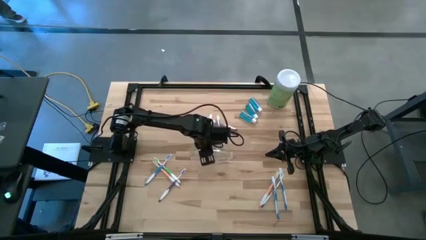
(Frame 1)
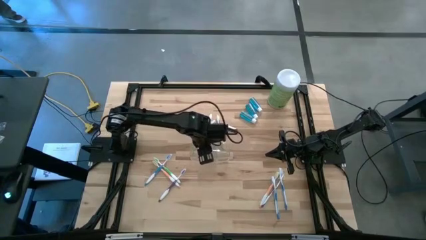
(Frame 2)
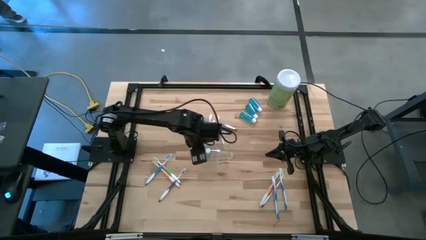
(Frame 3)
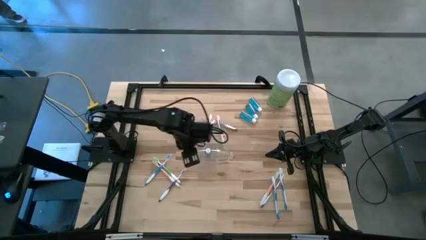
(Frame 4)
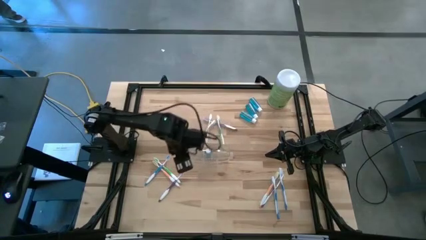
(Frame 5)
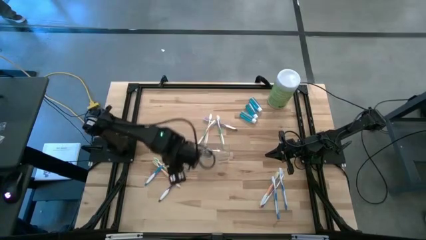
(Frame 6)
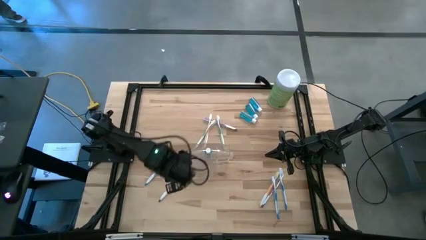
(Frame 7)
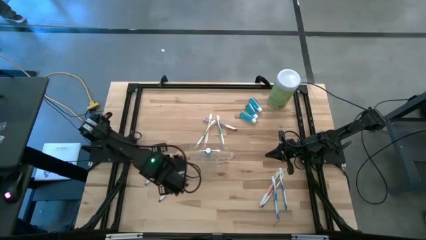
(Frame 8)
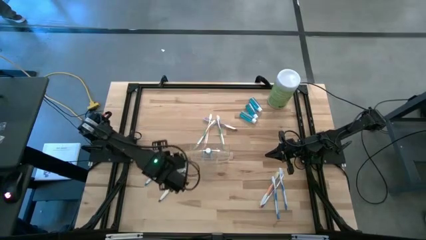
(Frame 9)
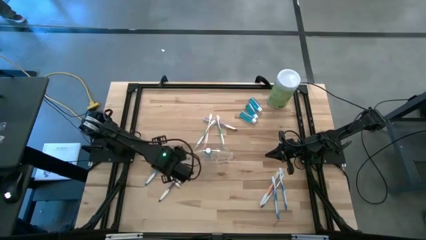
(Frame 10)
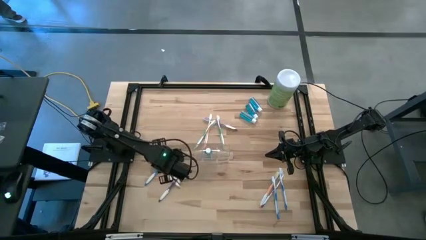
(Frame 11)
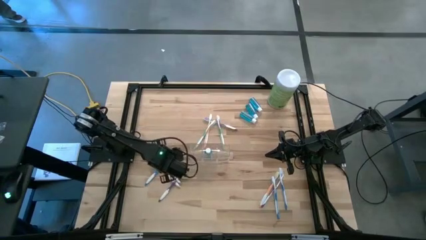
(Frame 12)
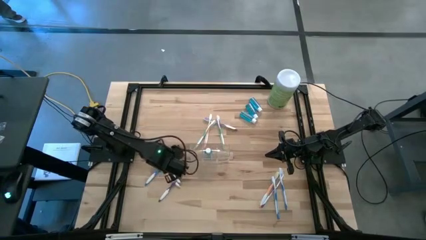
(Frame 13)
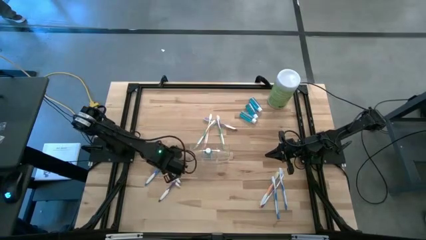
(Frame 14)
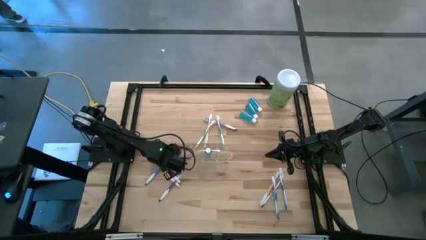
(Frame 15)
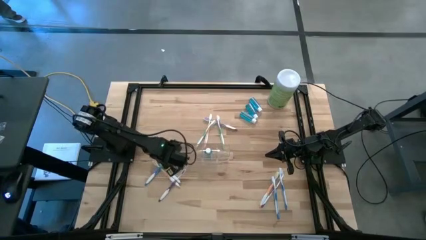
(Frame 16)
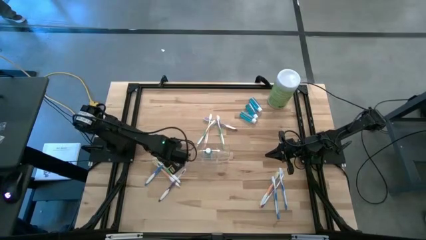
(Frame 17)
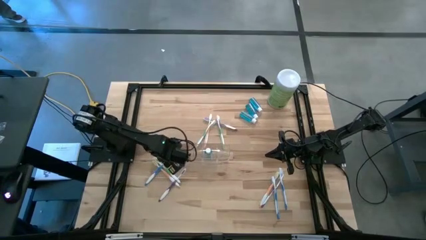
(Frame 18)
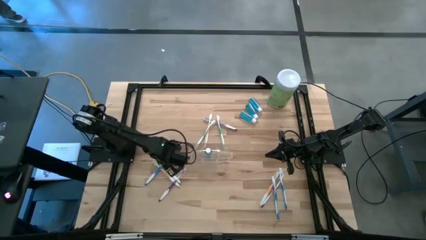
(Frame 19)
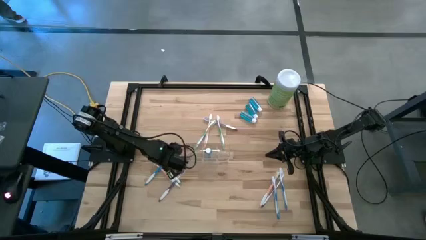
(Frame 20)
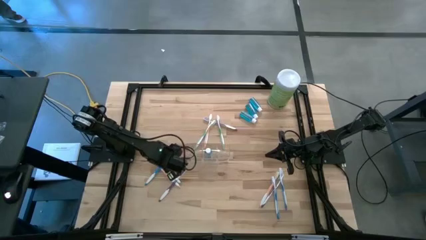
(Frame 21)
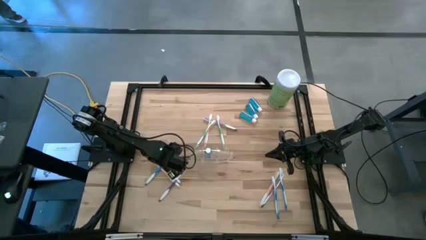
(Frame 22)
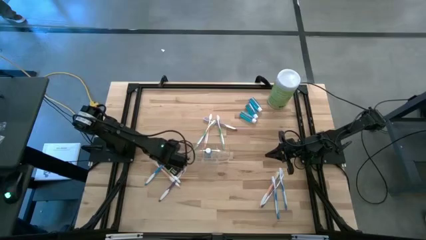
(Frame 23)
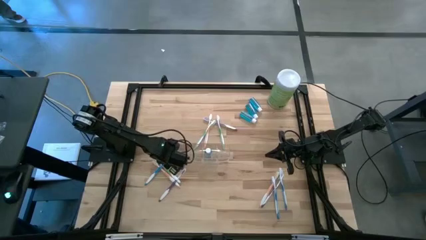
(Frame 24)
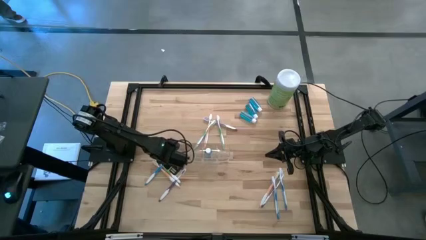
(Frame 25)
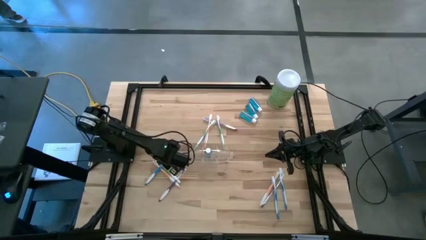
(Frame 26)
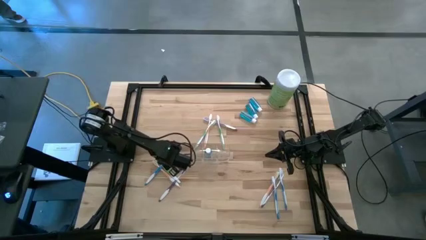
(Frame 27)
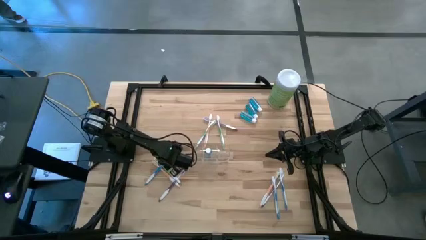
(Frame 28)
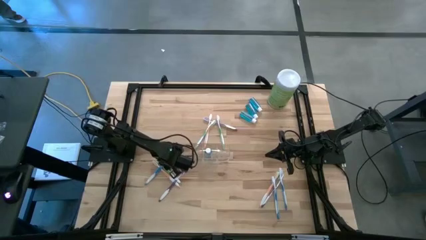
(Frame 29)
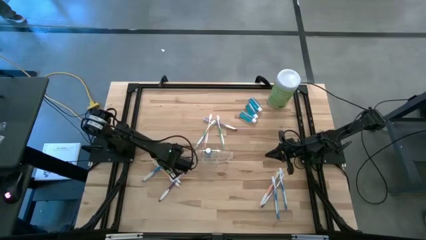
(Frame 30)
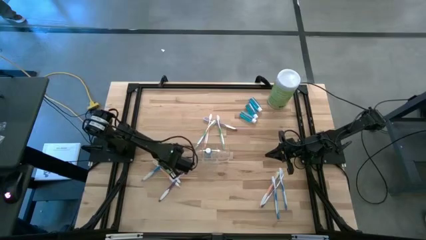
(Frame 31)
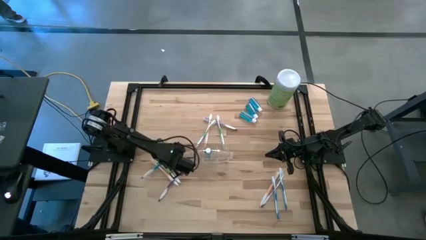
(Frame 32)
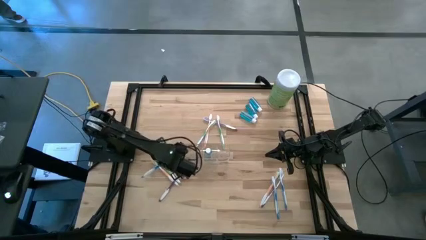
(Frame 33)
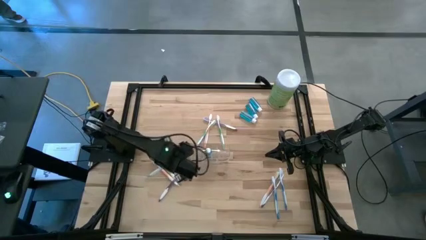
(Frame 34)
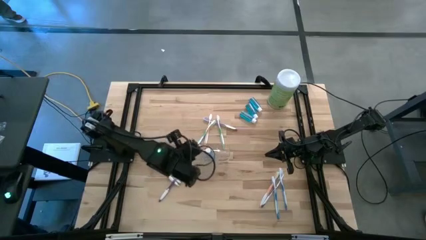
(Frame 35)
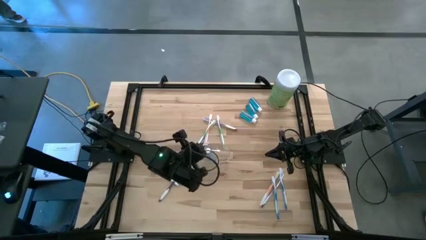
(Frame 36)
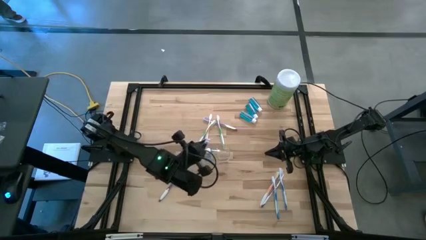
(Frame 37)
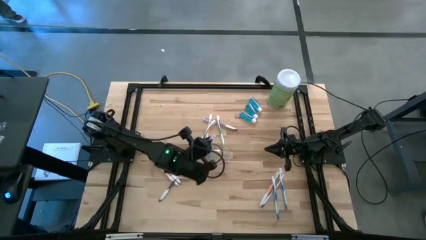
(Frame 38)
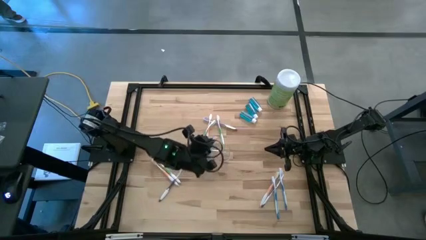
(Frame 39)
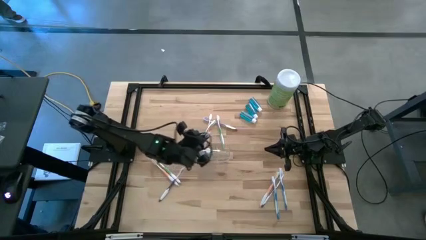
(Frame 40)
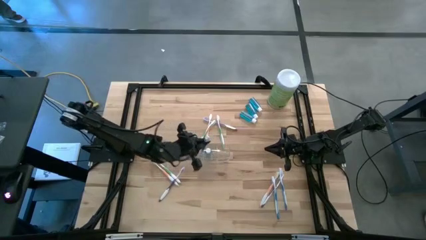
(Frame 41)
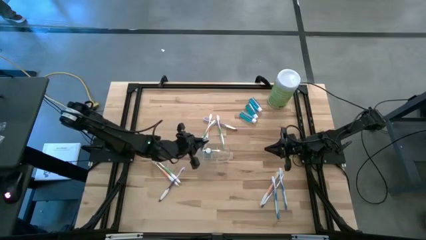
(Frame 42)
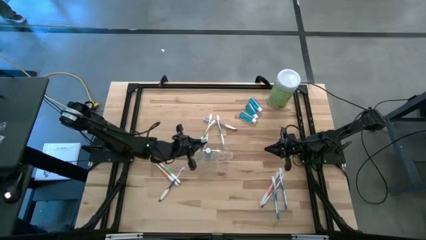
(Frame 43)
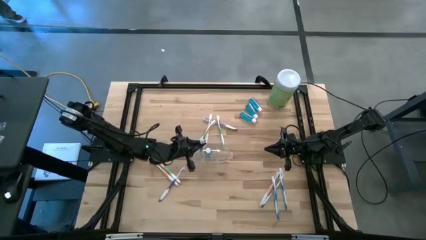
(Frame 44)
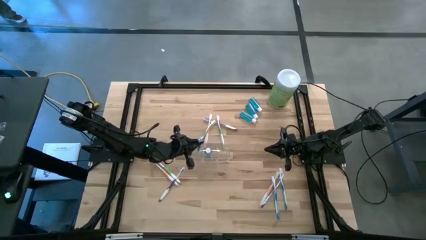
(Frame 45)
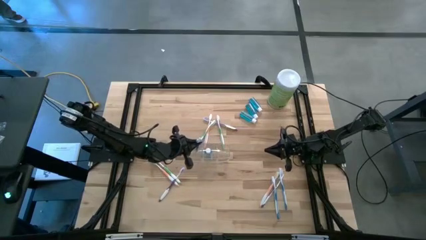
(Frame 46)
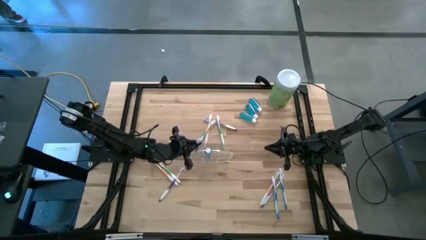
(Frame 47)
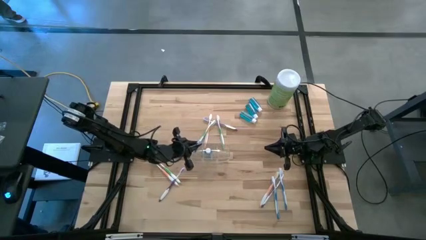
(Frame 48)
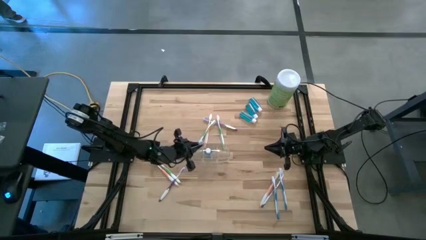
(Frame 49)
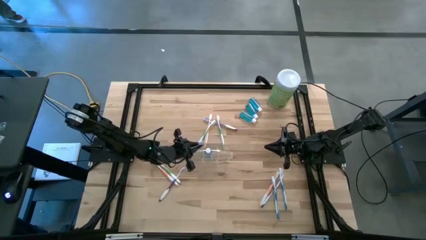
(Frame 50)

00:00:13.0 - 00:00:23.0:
Task: Pick & Place toothbrushing station
Put the blue toothbrush into the left side of the transparent organizer
